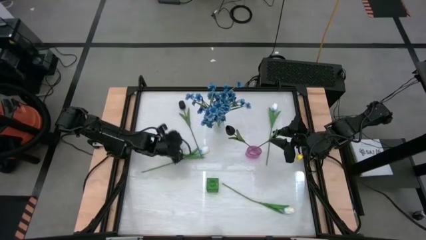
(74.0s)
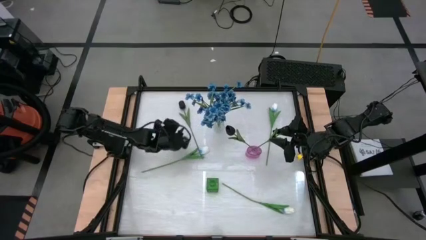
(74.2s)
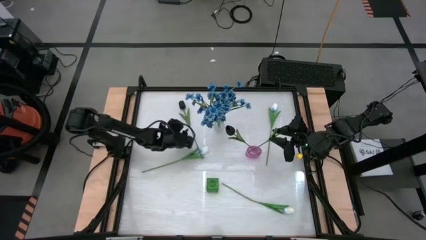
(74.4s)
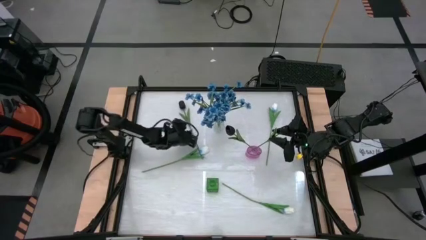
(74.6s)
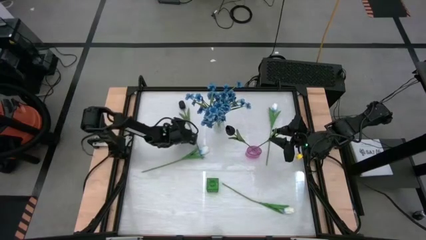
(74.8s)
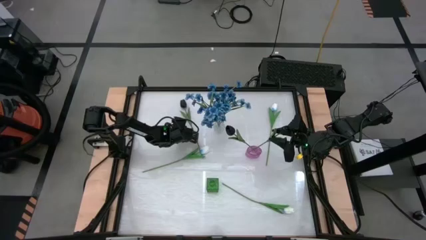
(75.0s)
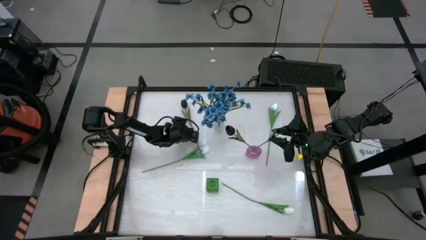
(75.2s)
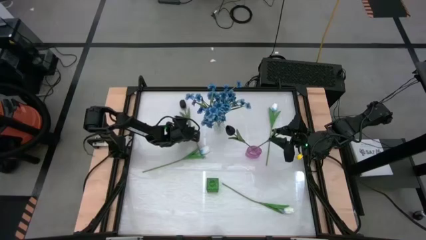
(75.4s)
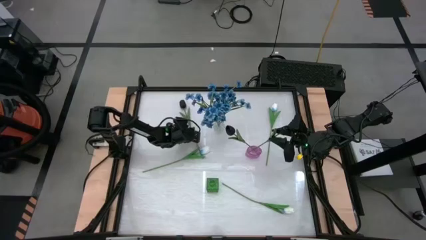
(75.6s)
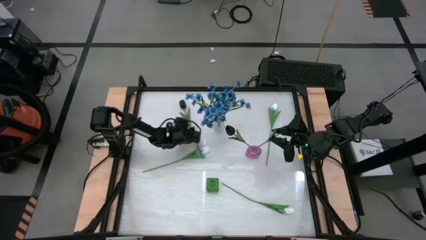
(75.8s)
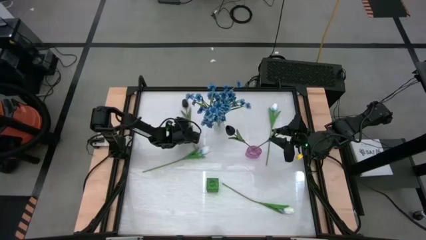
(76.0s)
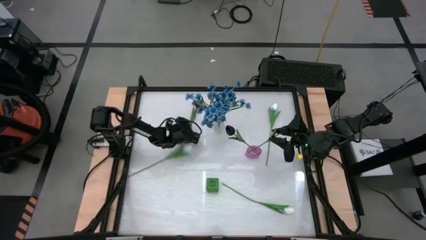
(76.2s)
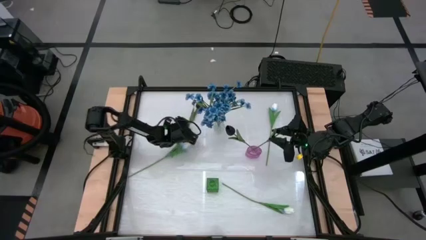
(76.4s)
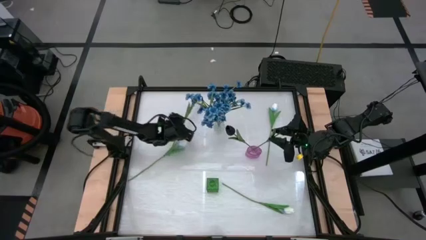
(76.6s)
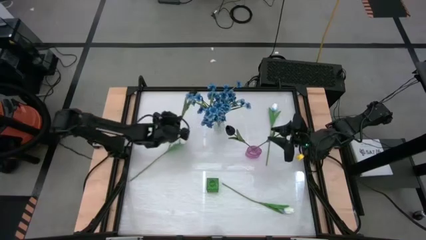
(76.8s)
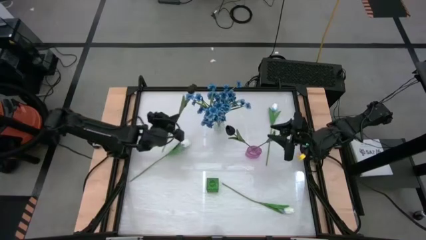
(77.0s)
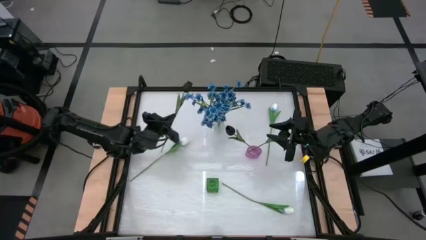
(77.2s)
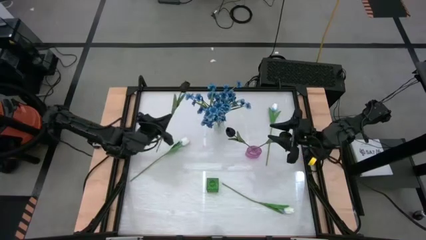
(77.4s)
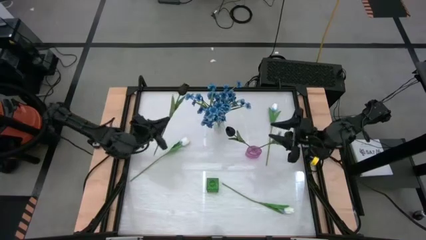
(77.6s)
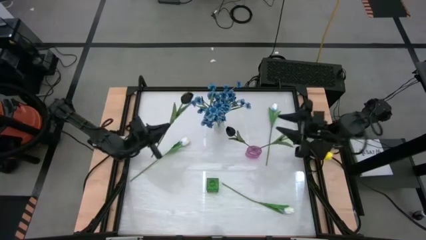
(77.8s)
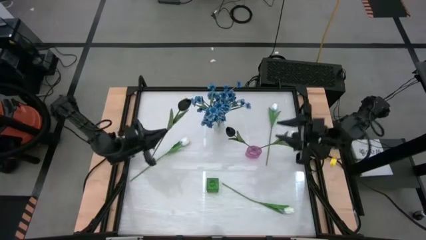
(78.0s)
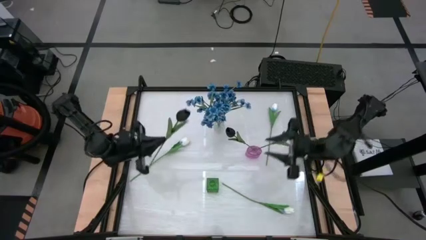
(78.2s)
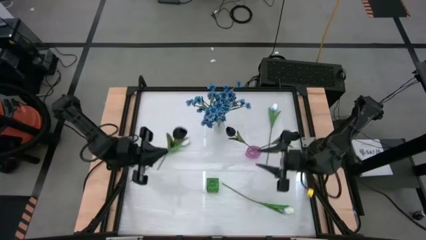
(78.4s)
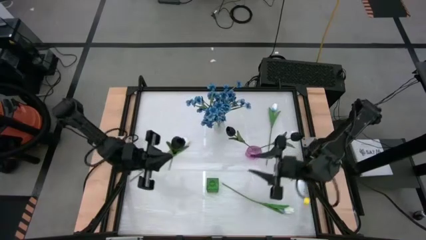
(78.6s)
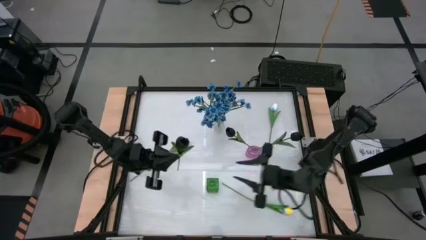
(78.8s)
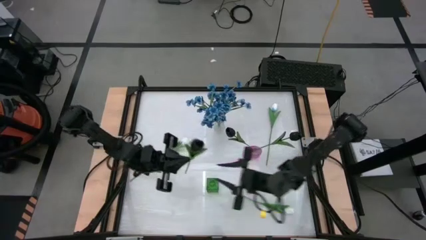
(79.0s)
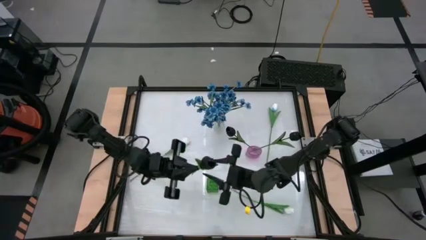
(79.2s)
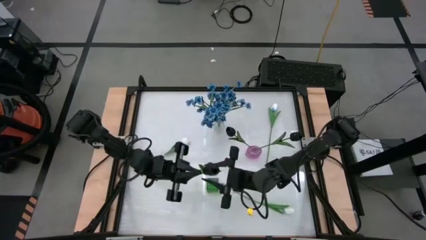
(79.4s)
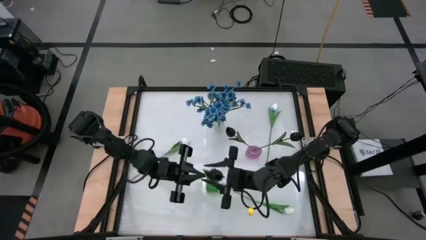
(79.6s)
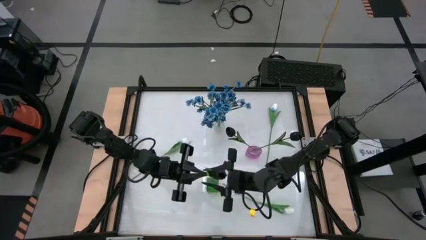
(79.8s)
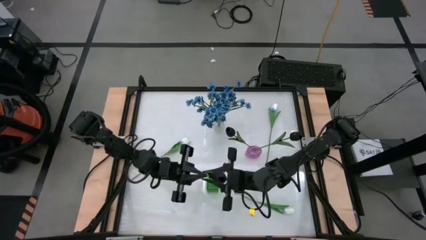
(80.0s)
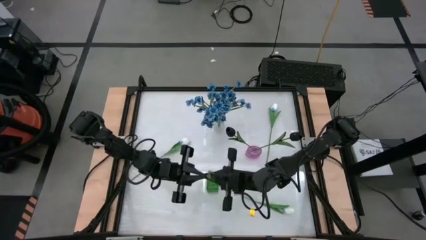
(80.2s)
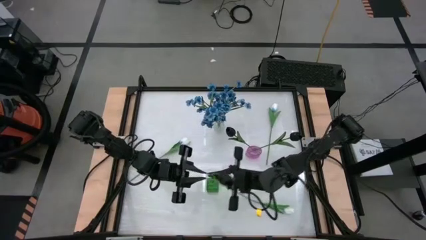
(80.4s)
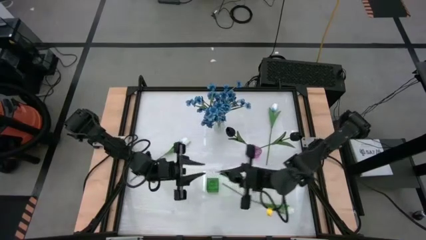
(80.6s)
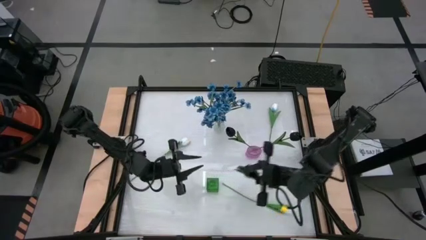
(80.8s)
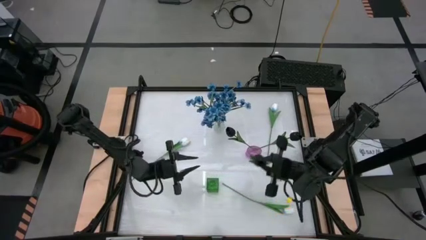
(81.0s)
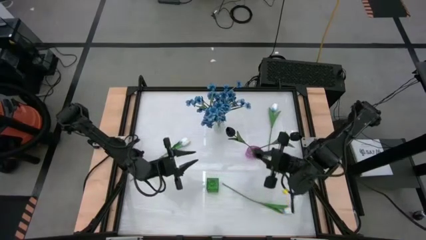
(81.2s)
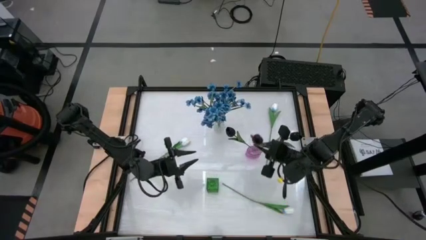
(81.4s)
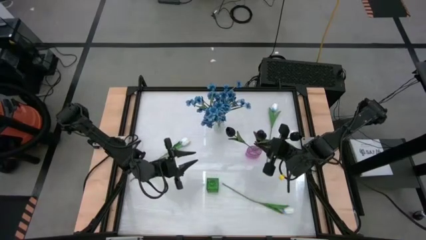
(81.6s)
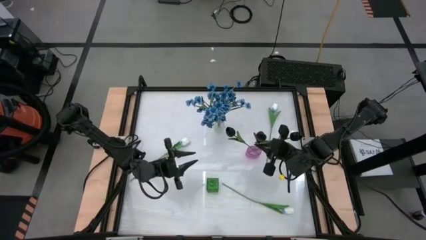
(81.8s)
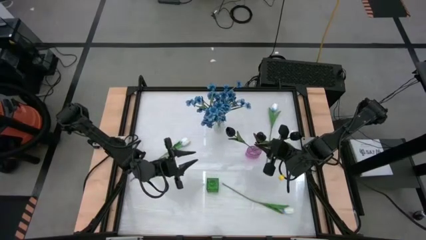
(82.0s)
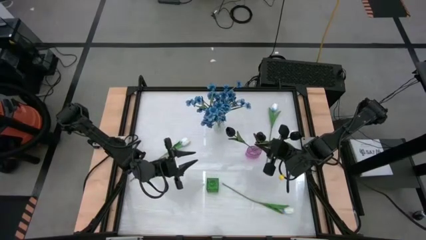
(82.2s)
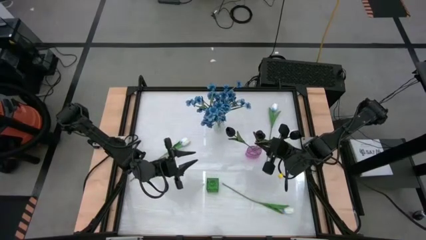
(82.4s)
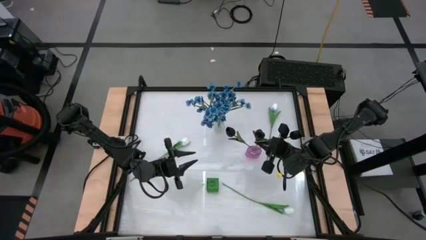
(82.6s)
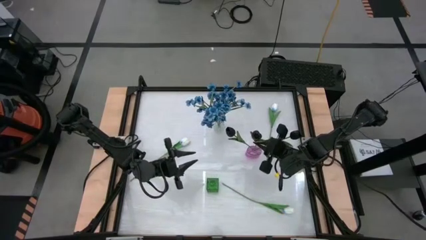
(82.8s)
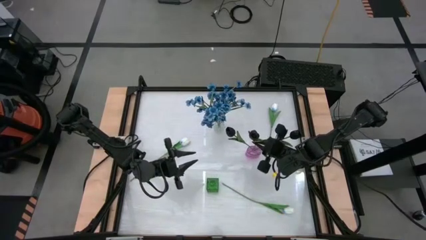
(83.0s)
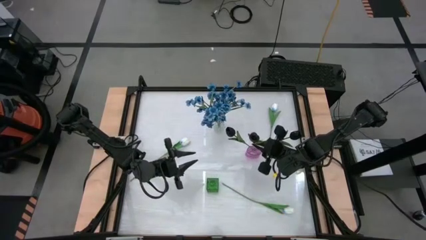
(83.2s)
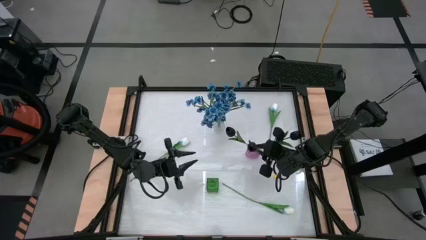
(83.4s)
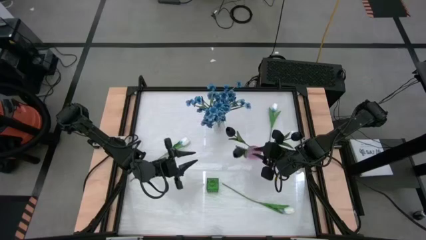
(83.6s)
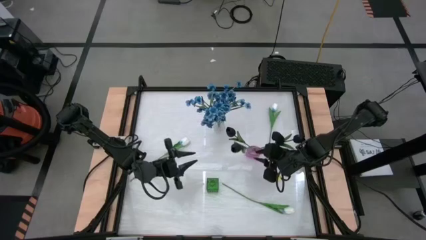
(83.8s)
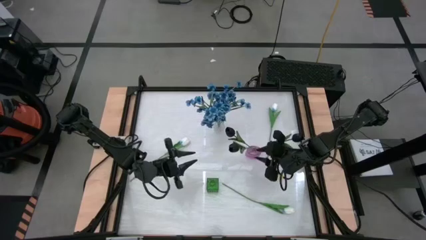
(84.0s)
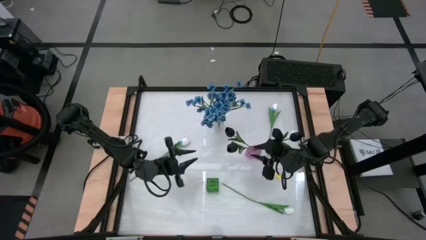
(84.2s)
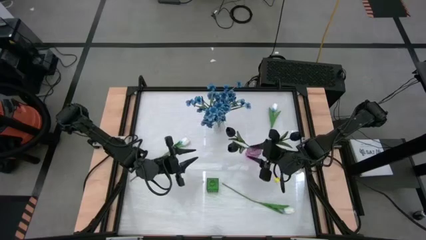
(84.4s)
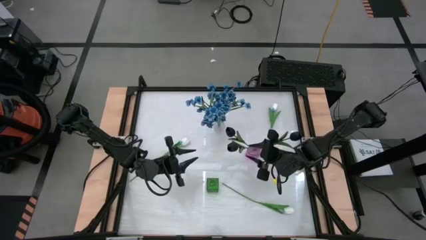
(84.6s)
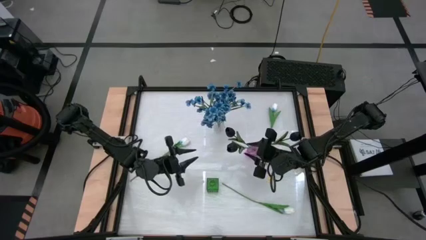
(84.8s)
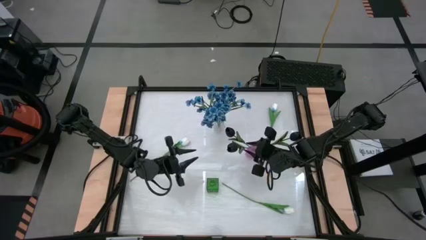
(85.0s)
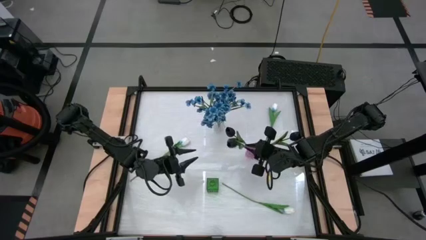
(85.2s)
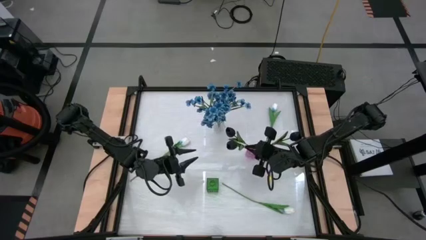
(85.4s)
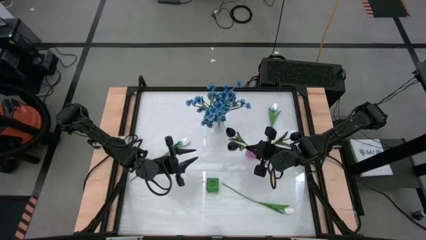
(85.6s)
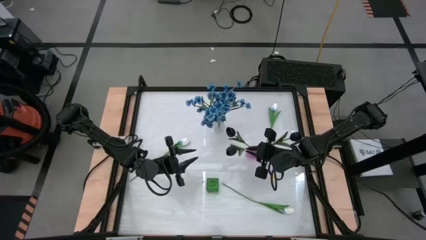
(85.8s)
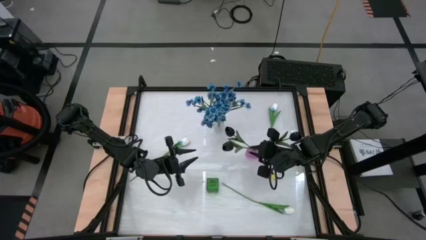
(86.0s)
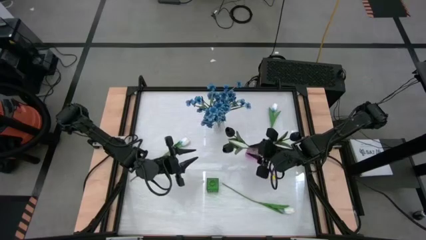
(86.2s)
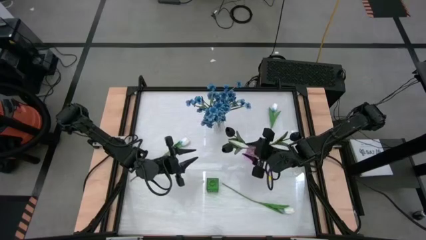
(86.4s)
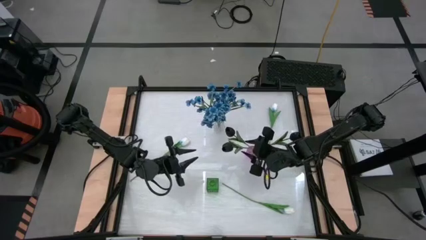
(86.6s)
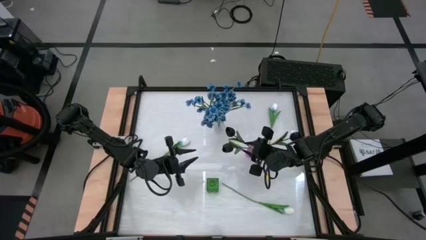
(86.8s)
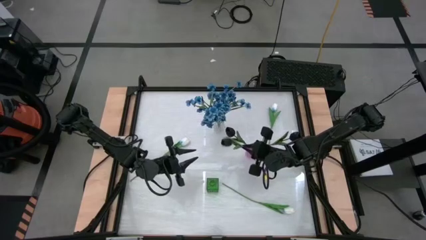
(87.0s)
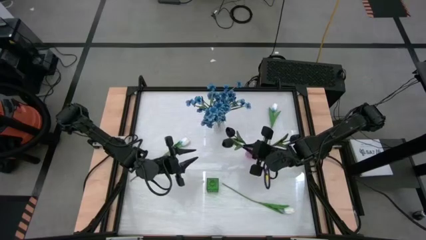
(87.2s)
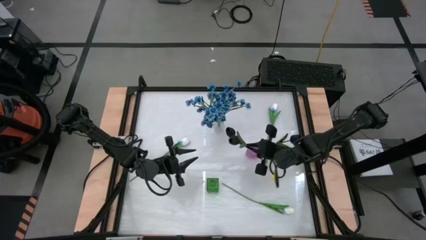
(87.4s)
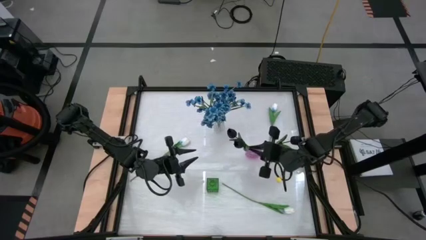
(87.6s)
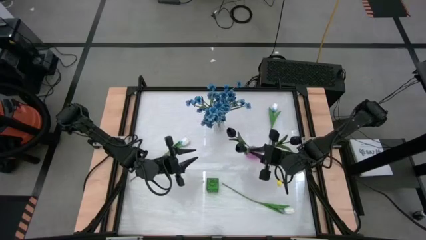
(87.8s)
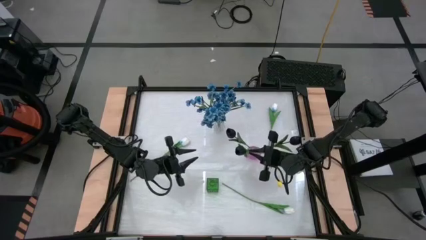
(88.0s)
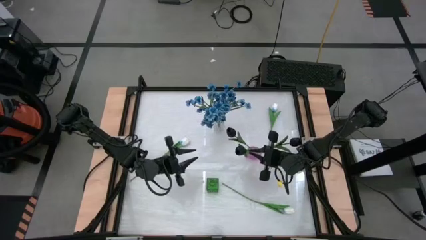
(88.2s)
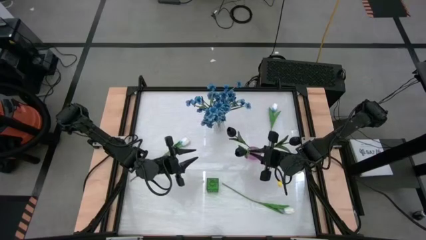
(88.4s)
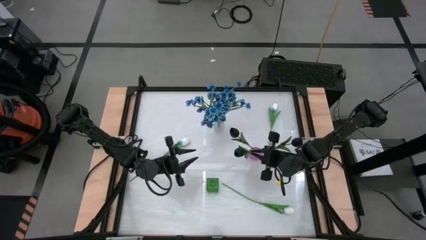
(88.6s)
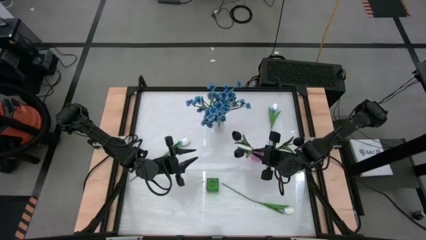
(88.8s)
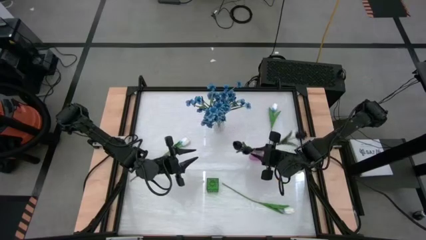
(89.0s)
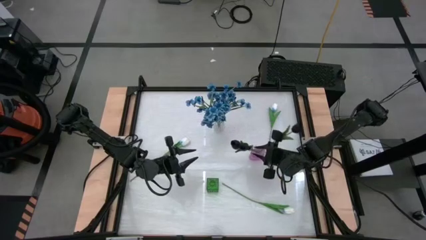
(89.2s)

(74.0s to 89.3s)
Task: Sort flowers into vase by color
Put the black tulip into the purple vase

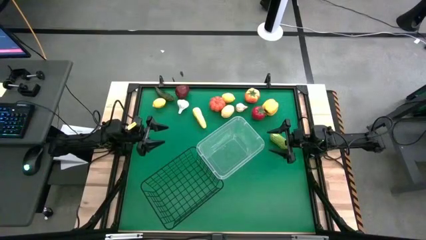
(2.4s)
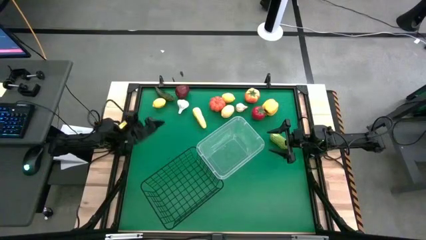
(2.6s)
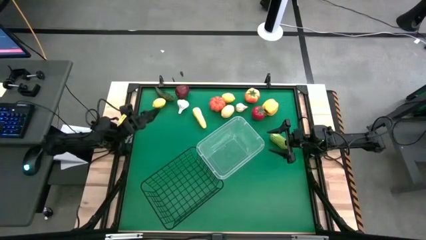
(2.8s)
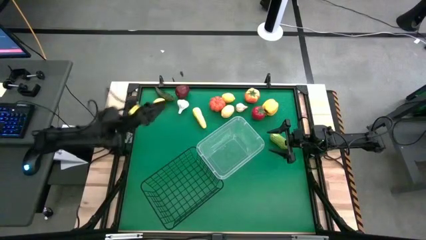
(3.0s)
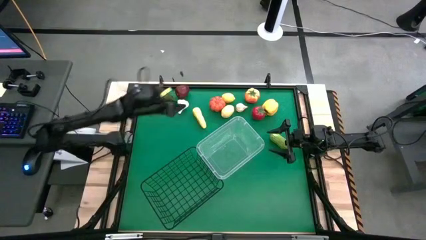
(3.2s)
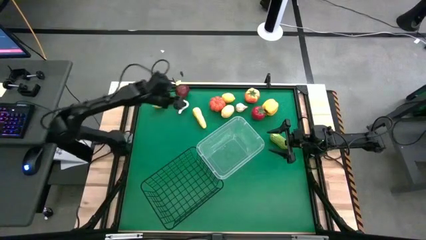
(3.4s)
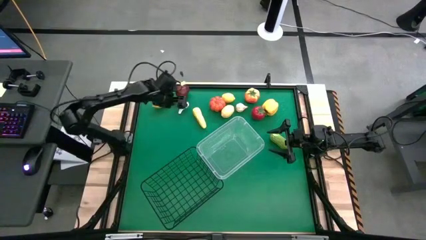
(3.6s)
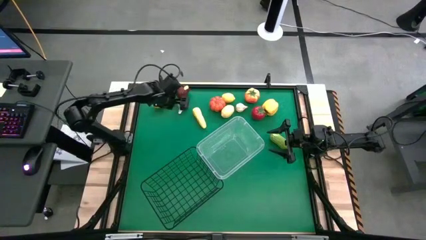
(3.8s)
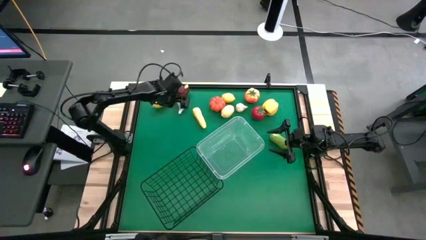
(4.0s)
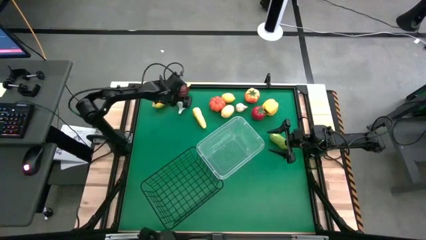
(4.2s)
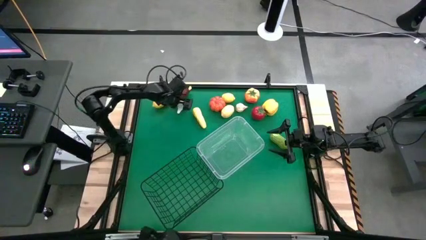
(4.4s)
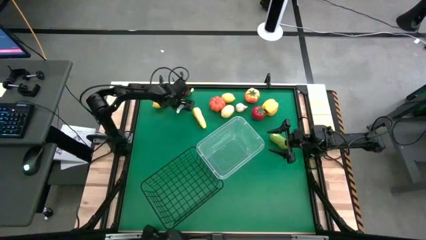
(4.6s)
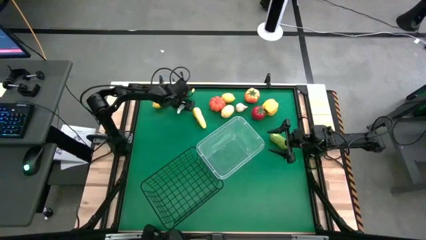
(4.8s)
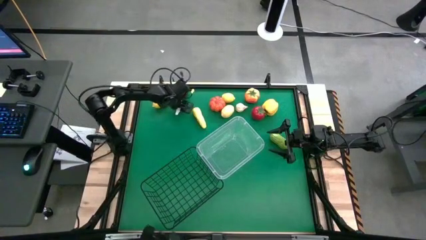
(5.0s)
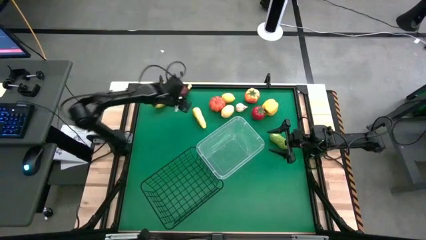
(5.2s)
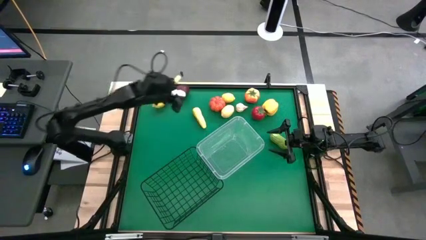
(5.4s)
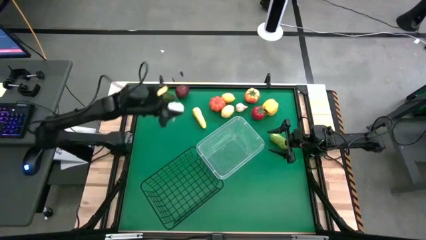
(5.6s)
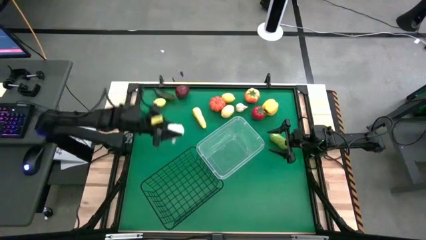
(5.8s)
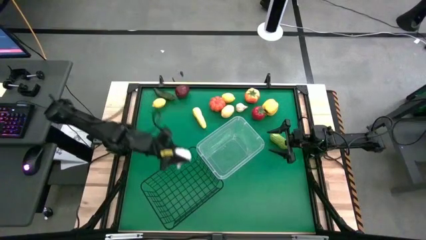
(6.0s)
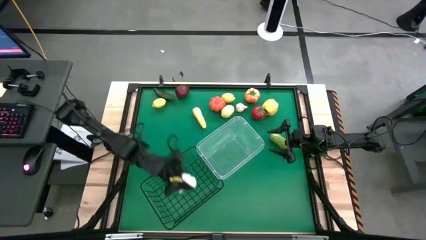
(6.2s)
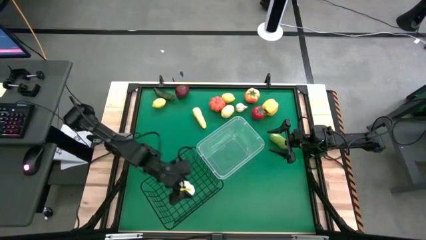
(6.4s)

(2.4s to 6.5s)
Task: Sort produce into baskets
Put the left white garlic into the wire basket
